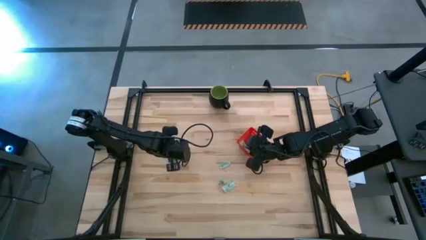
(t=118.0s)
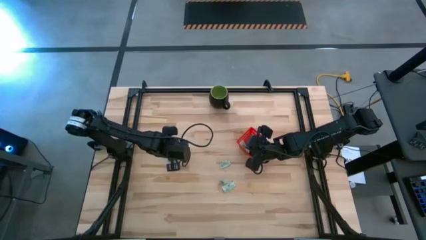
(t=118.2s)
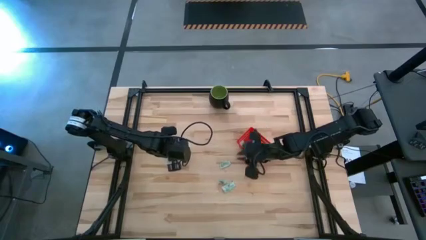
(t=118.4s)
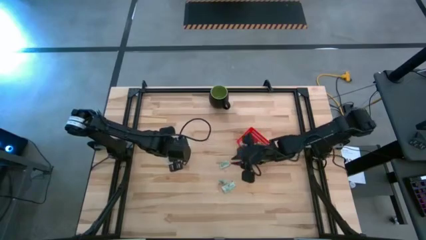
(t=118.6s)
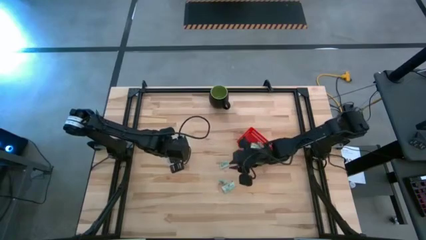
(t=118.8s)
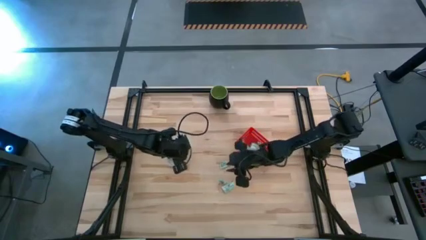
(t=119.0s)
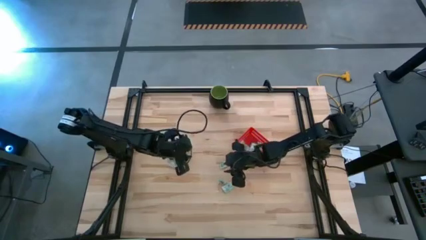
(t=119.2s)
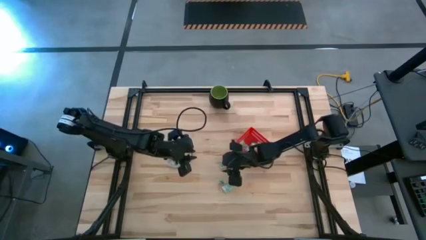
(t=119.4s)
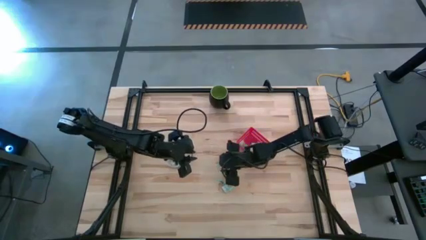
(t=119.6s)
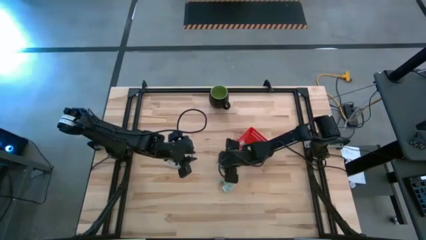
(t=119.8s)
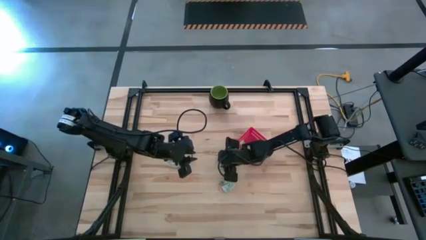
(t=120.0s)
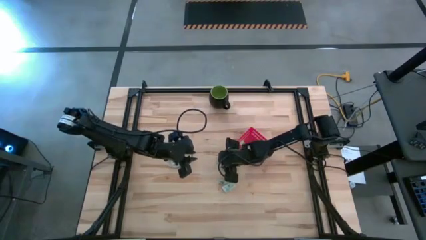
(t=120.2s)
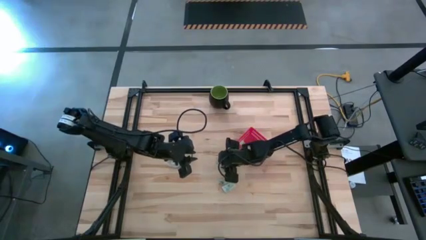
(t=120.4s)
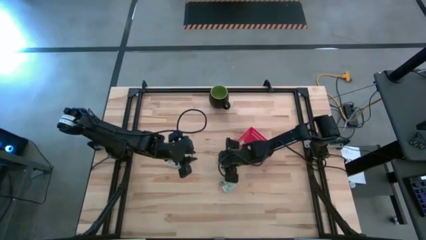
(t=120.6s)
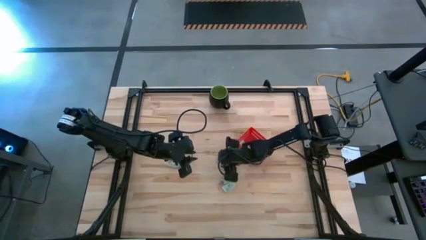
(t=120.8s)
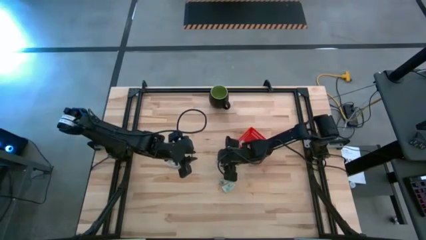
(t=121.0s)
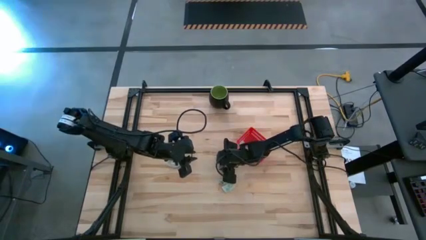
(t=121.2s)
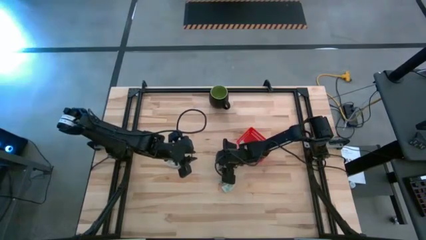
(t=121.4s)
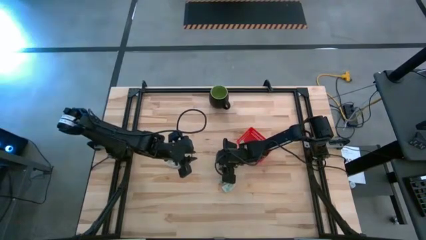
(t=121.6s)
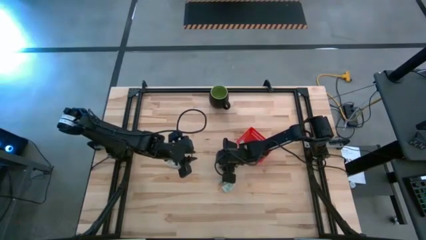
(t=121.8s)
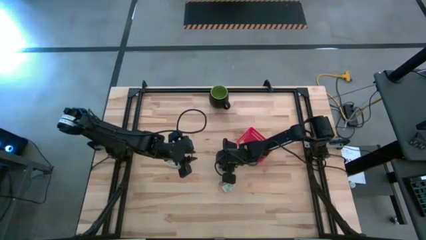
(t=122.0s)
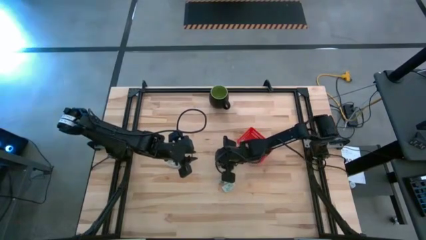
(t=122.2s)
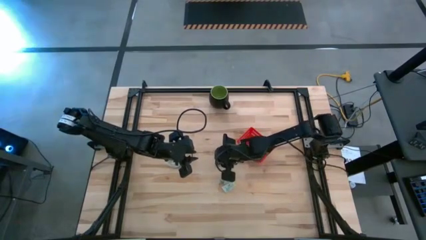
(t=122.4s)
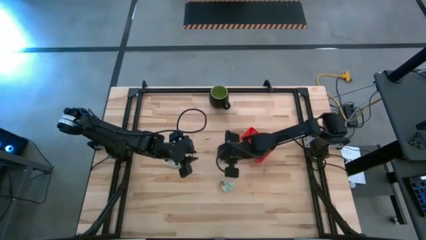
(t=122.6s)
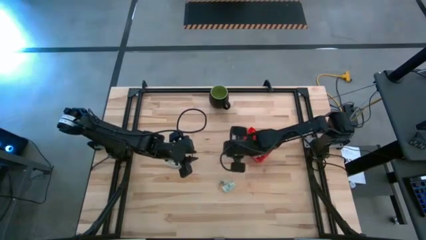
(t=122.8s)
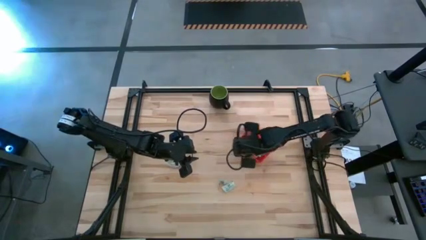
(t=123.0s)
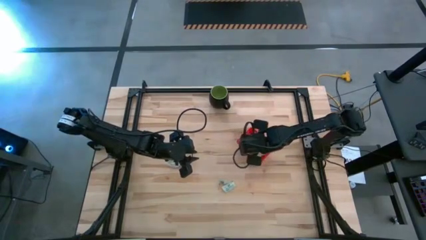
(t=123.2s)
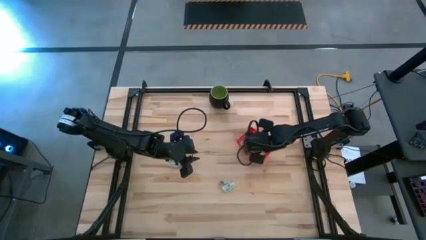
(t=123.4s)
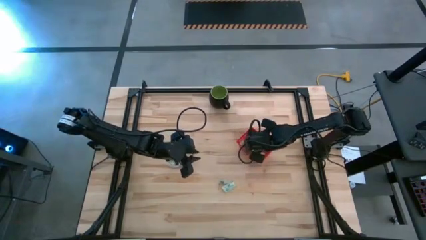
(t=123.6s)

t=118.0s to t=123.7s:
Task: Pick and place items into bin
Put the stevia packet into the red basket

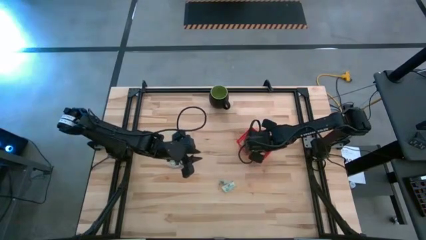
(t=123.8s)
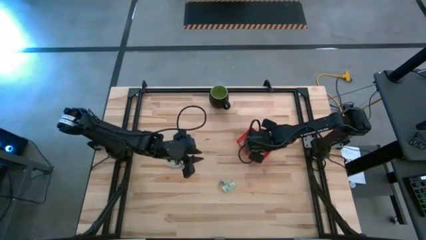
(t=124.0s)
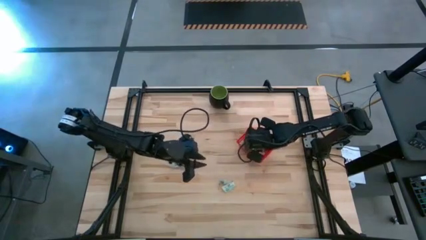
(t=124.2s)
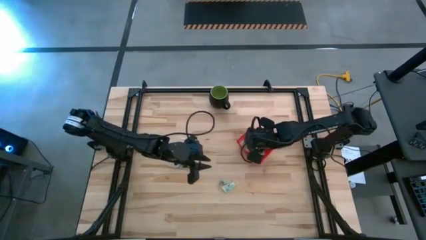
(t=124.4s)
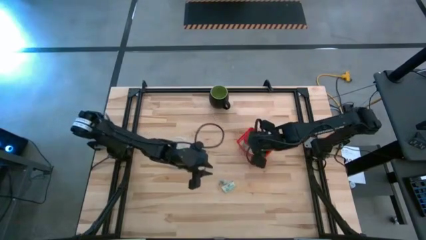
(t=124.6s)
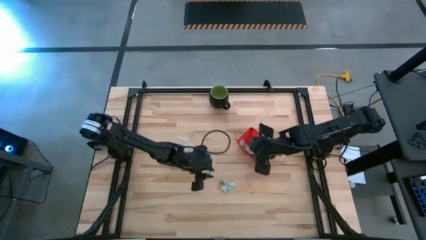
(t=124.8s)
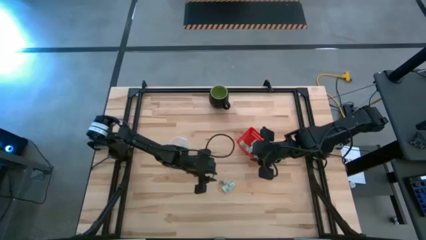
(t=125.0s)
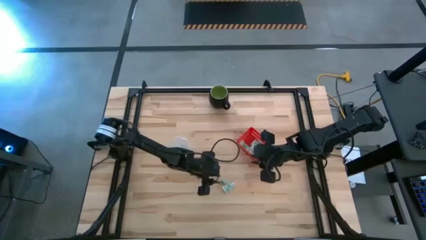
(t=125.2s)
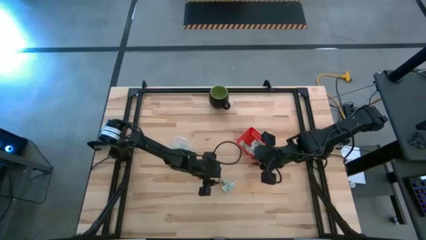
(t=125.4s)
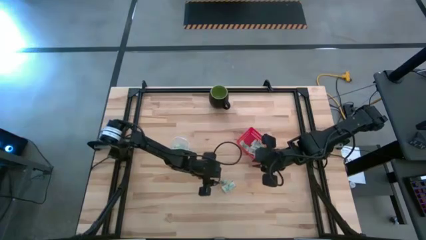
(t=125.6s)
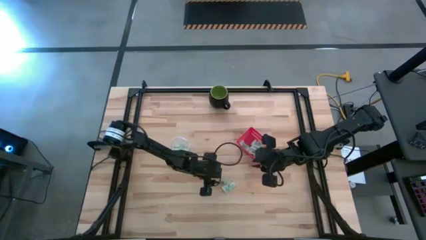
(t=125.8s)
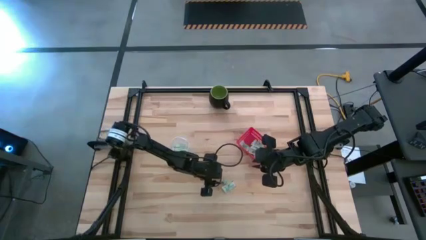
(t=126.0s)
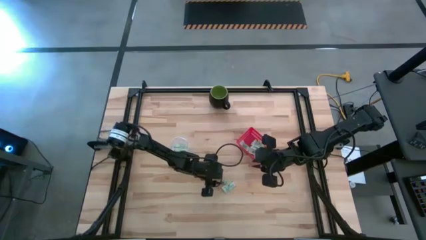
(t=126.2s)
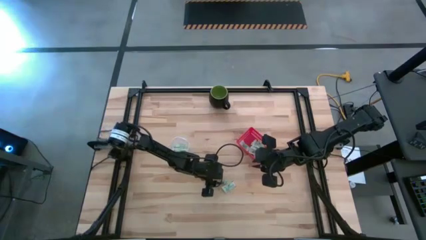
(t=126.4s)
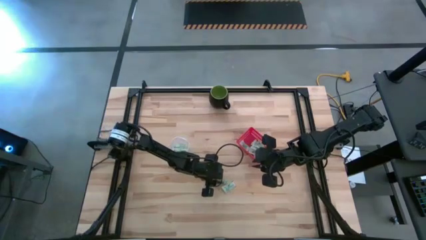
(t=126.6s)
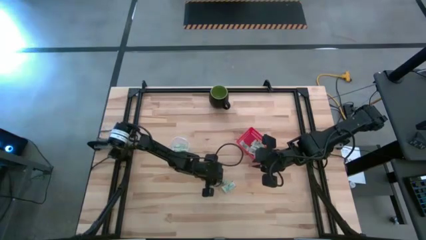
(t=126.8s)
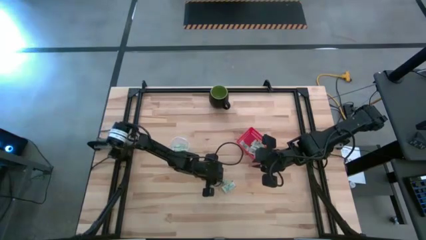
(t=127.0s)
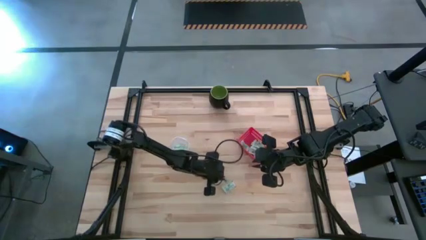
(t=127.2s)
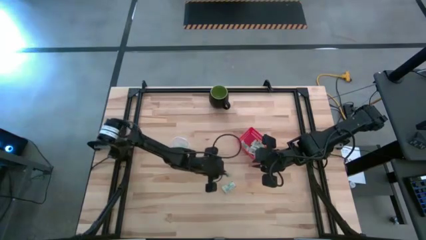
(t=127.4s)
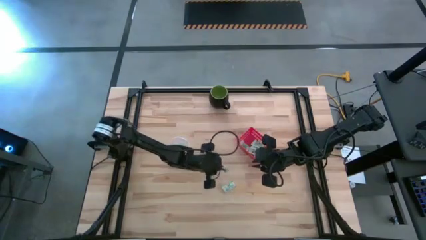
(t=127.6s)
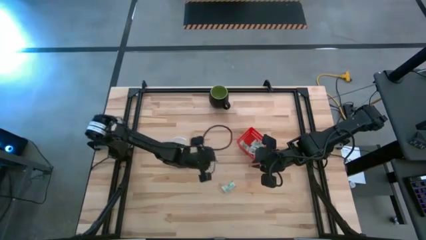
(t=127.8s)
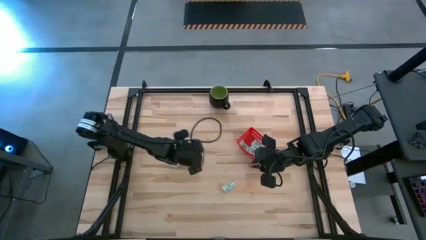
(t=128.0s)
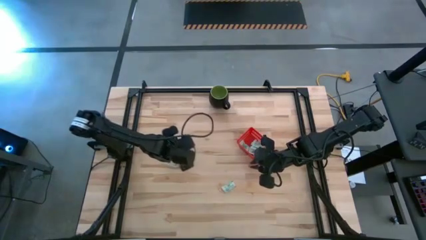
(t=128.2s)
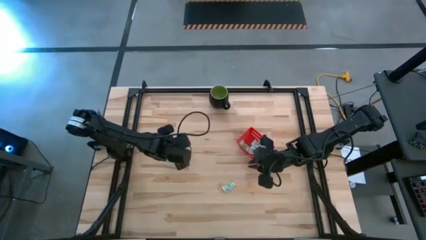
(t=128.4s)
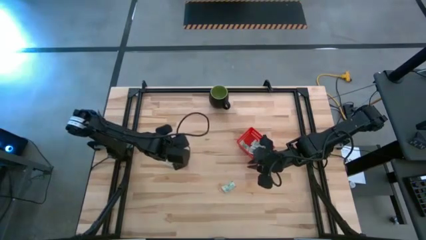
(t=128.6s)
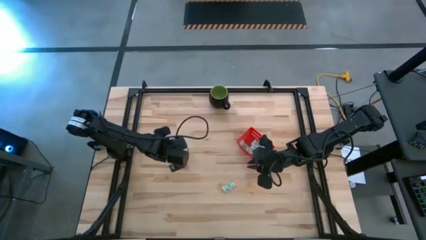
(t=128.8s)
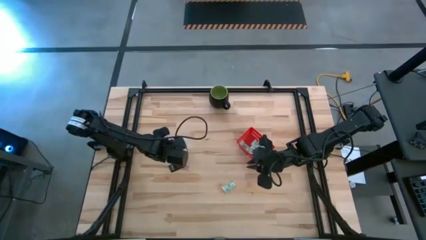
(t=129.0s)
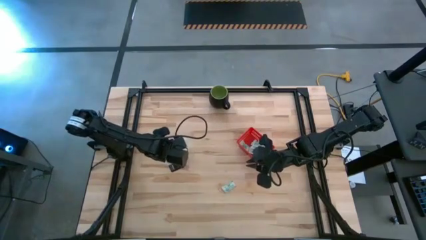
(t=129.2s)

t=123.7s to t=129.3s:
Put the stevia packet into the transparent bin

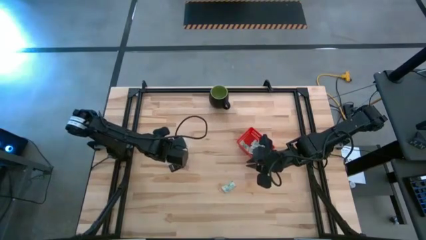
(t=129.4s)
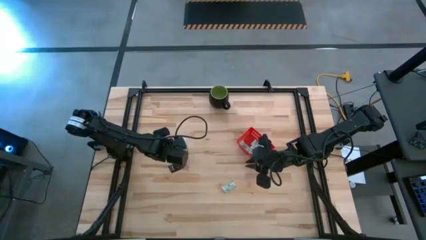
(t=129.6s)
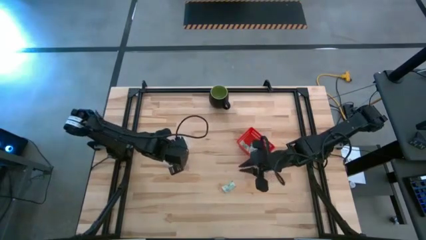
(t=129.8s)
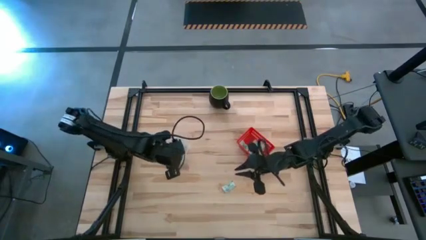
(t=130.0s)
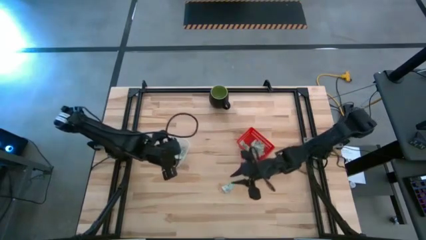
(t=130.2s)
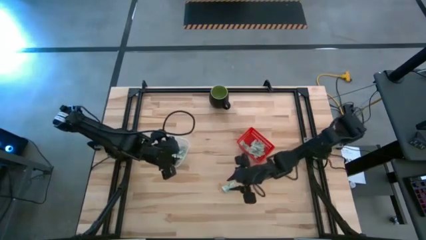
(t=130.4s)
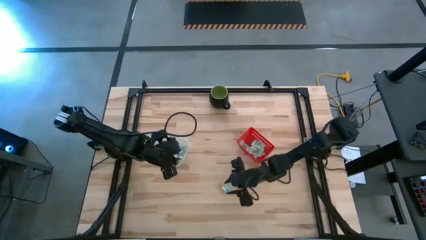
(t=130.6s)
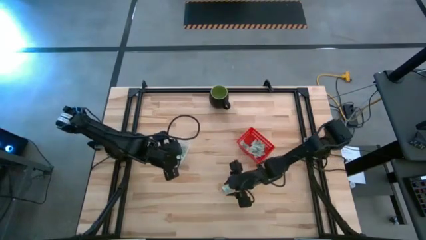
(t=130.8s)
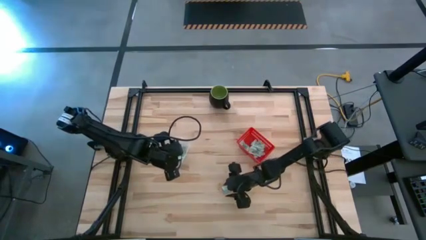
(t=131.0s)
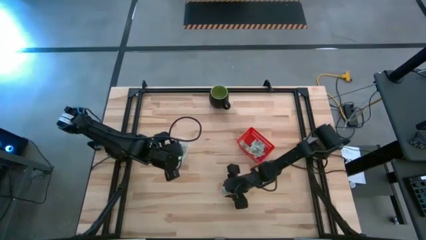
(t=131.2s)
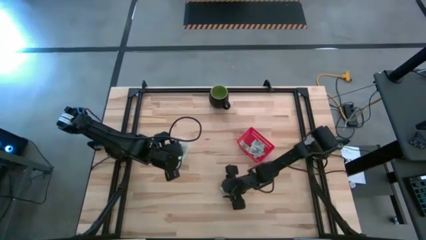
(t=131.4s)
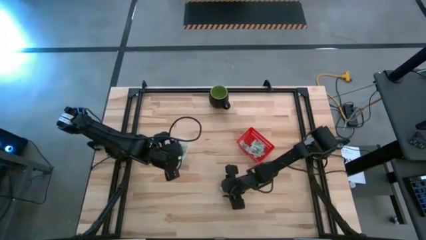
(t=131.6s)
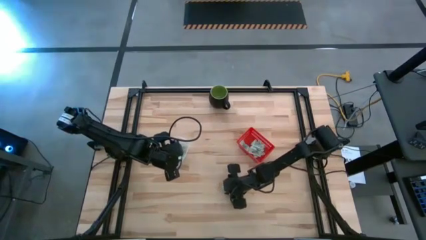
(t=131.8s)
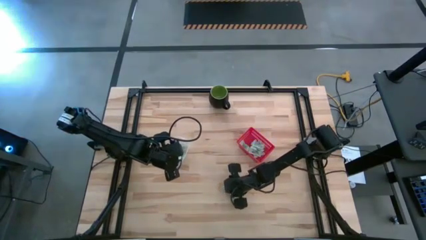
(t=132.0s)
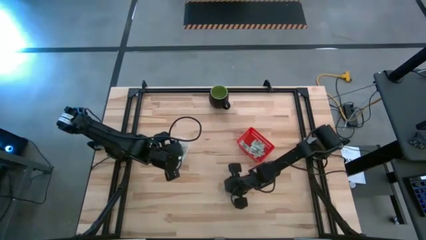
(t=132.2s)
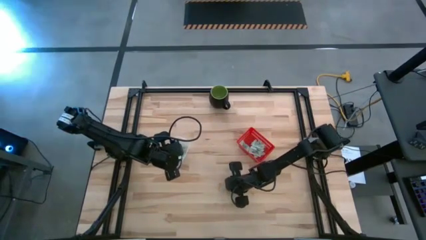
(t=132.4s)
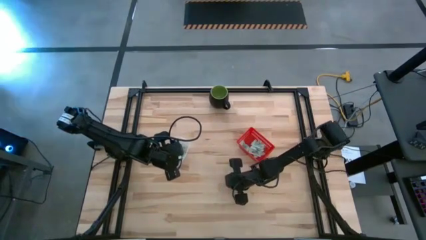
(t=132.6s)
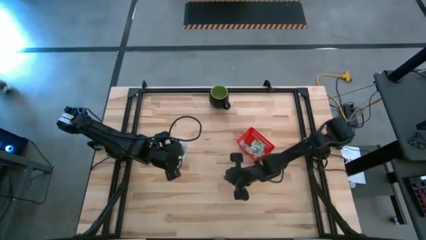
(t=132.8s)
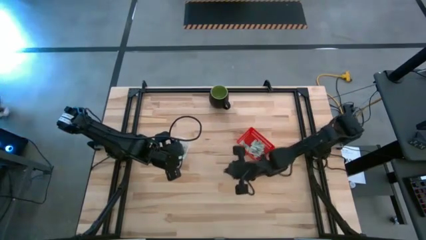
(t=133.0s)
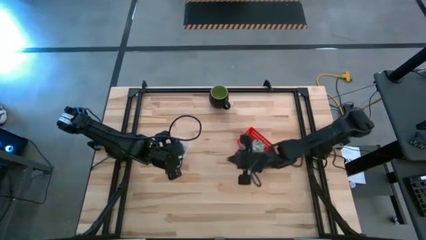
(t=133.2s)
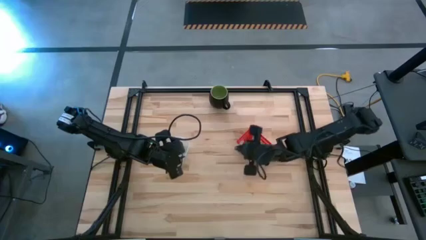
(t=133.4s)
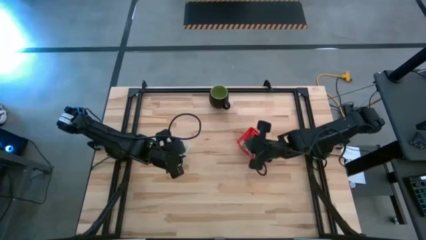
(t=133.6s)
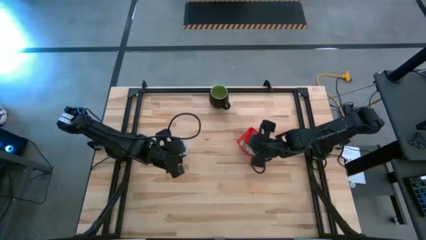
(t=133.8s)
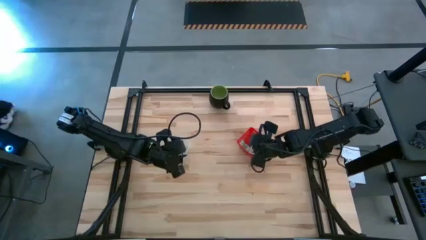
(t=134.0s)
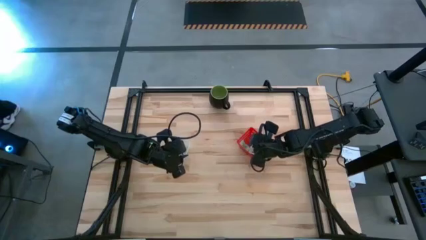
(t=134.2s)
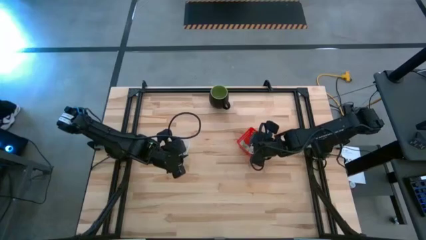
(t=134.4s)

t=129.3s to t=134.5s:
Put the stevia packet into the red basket
